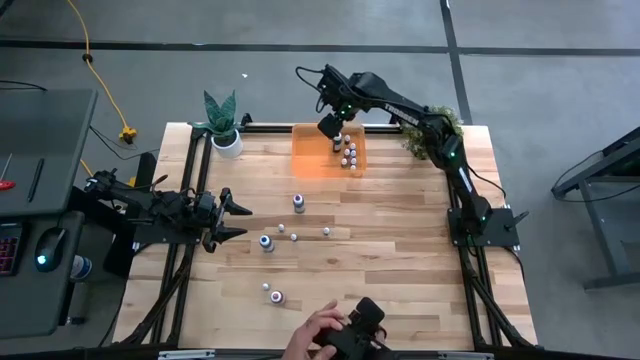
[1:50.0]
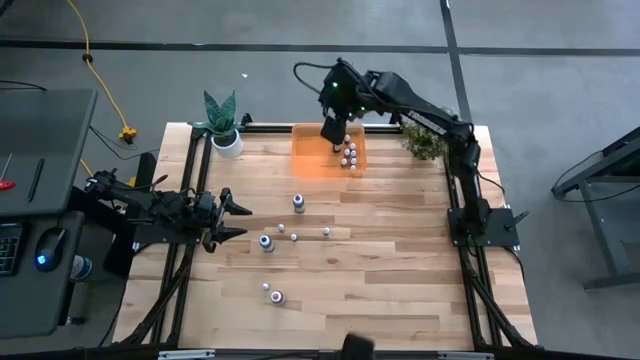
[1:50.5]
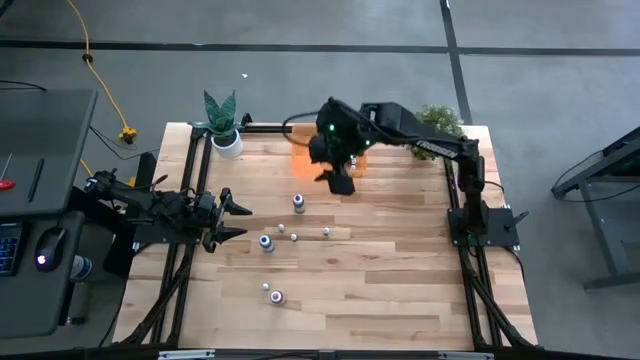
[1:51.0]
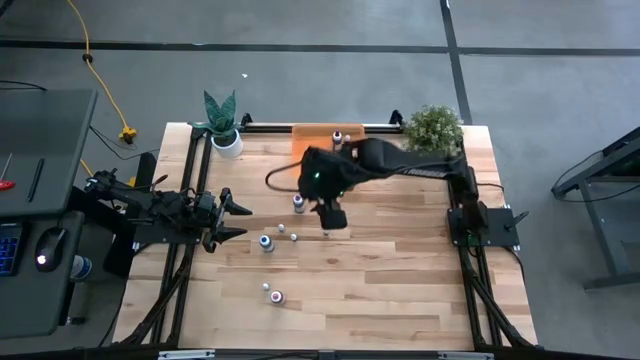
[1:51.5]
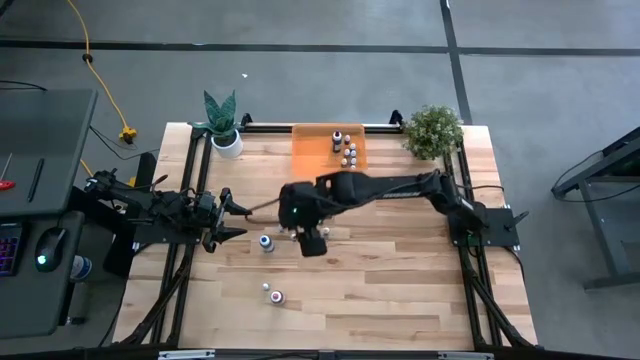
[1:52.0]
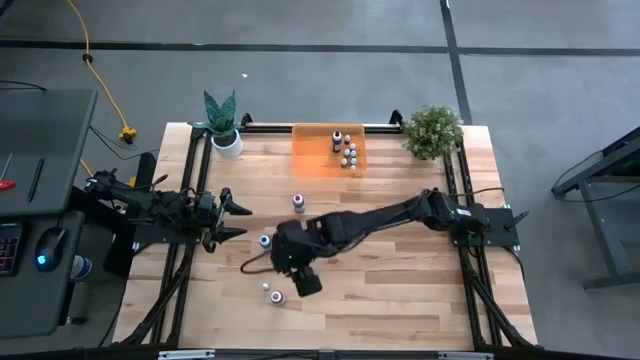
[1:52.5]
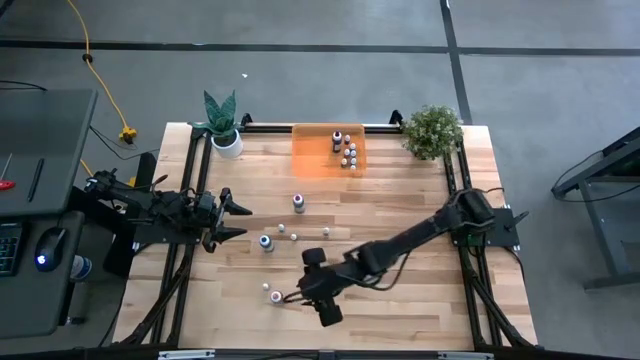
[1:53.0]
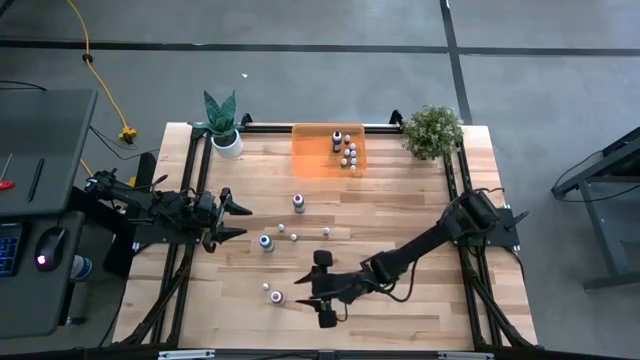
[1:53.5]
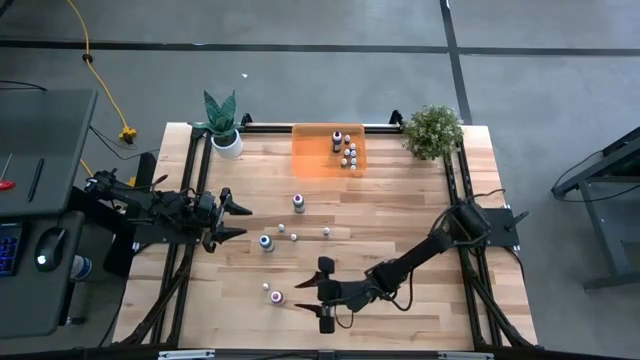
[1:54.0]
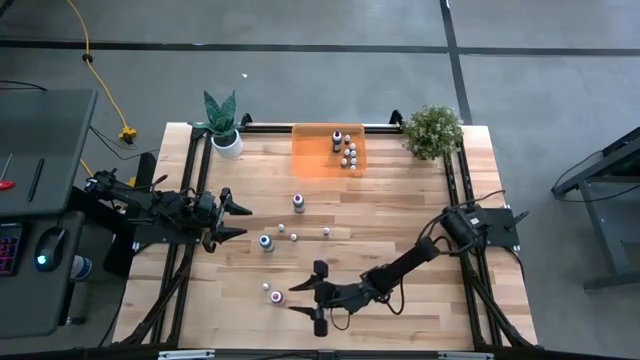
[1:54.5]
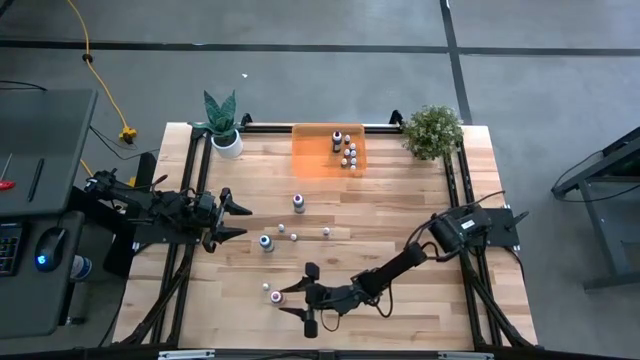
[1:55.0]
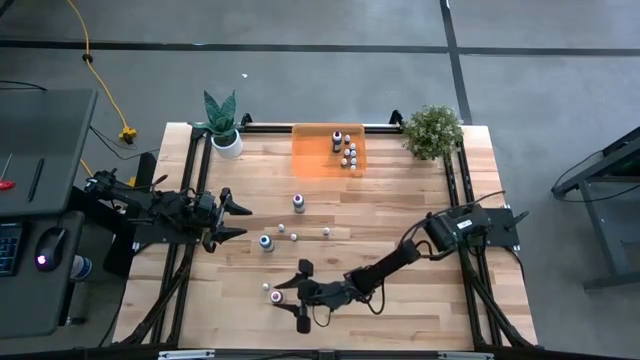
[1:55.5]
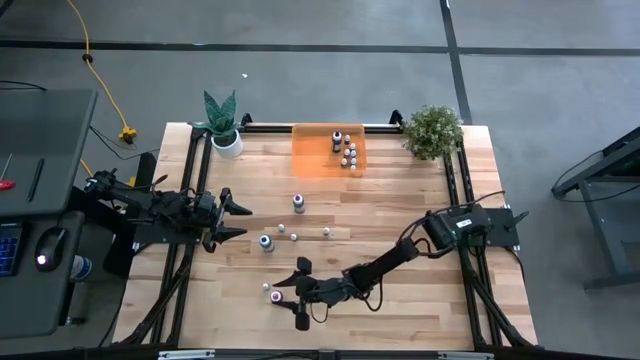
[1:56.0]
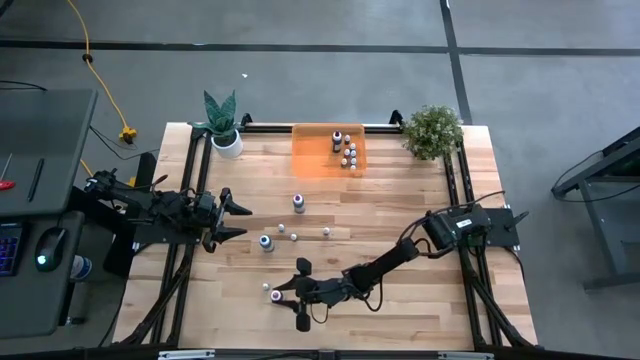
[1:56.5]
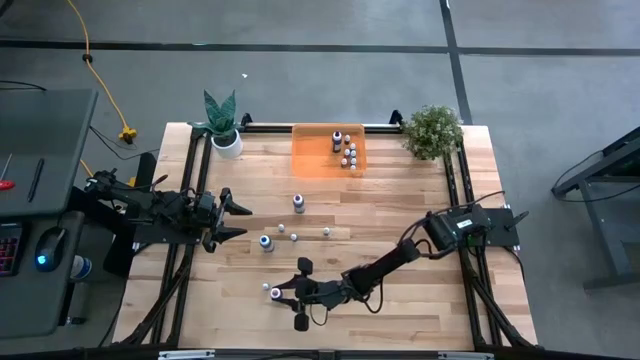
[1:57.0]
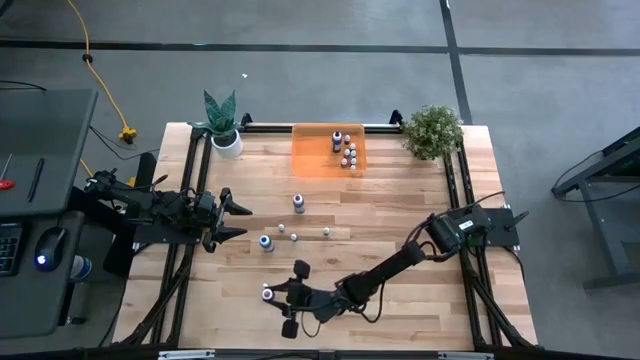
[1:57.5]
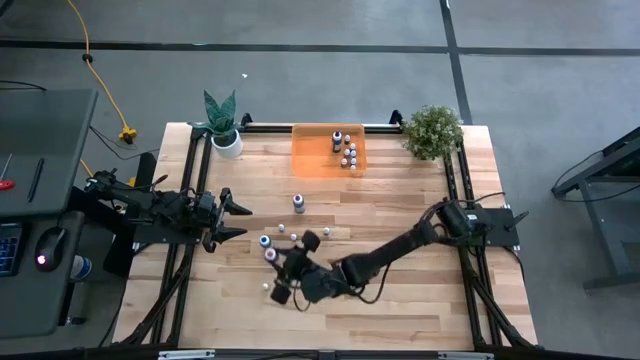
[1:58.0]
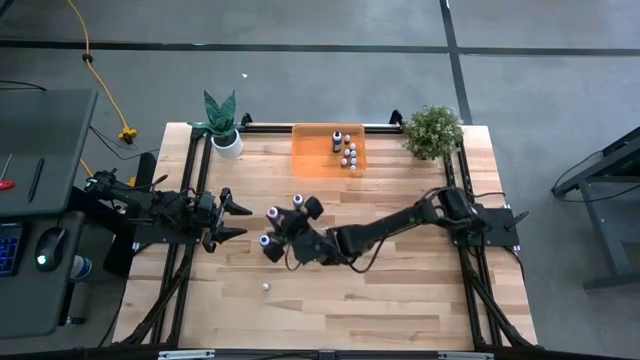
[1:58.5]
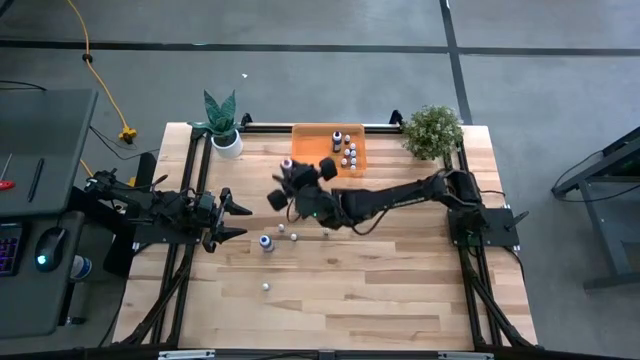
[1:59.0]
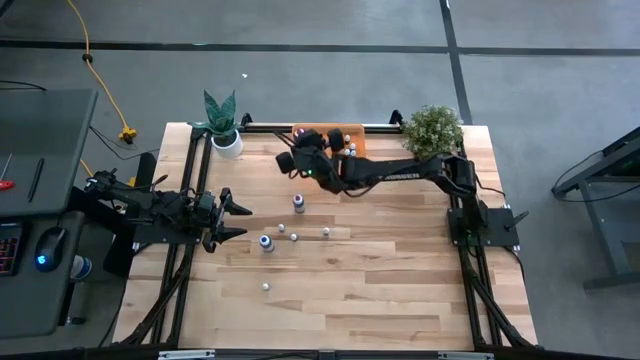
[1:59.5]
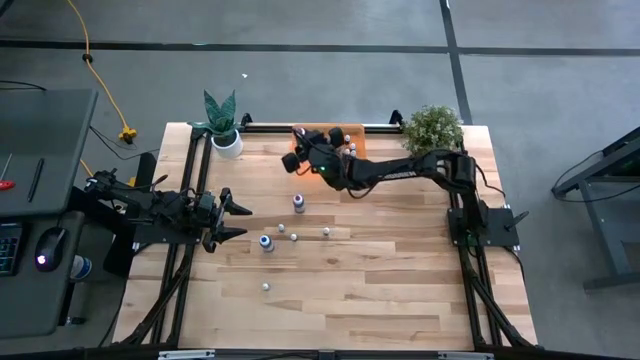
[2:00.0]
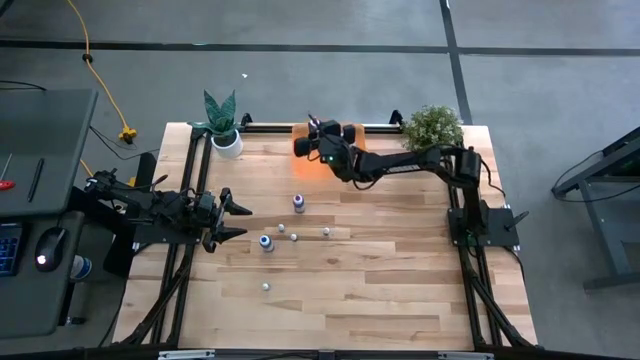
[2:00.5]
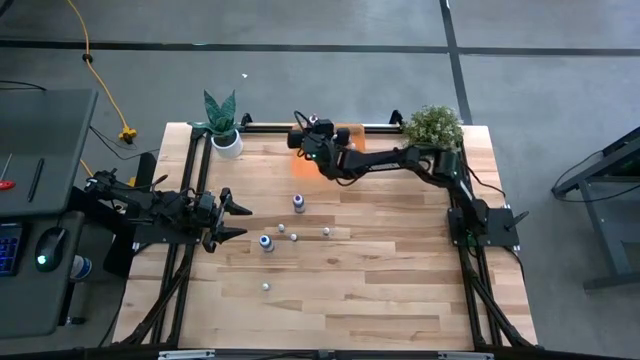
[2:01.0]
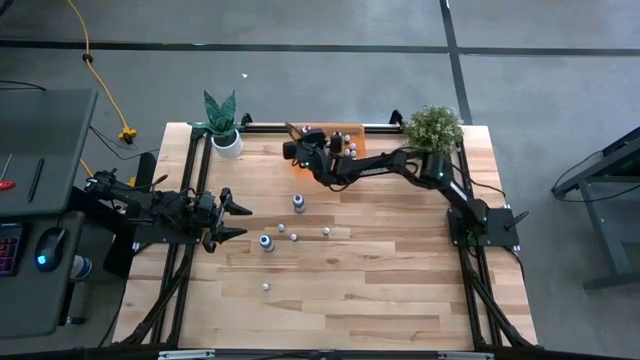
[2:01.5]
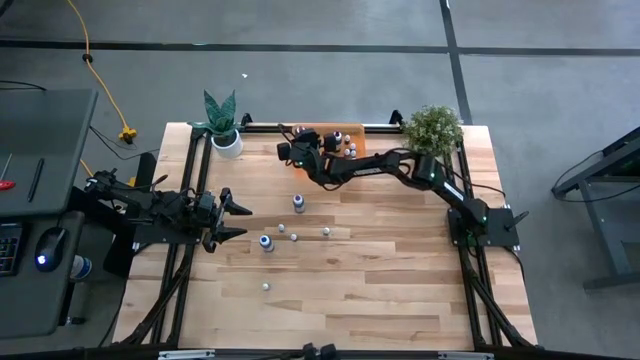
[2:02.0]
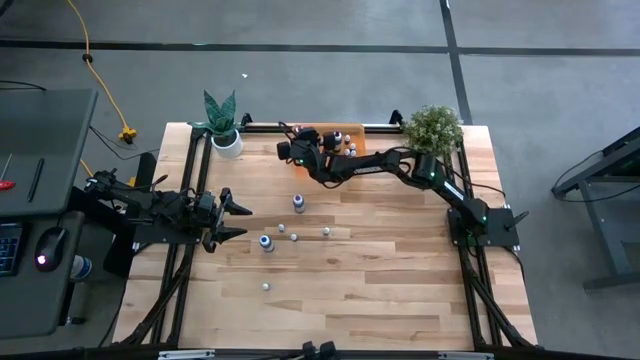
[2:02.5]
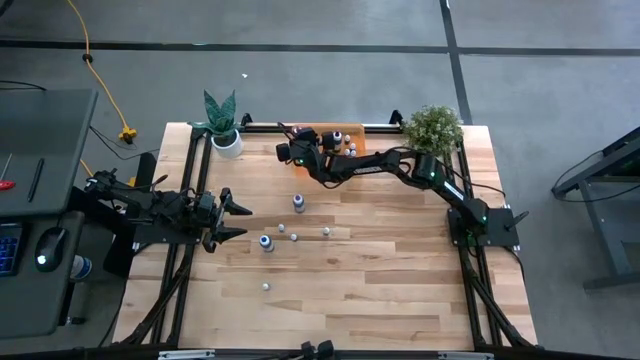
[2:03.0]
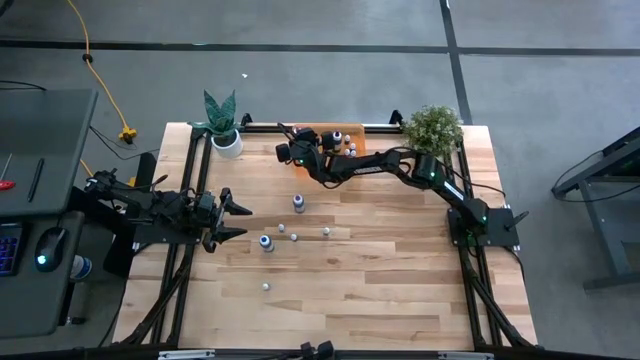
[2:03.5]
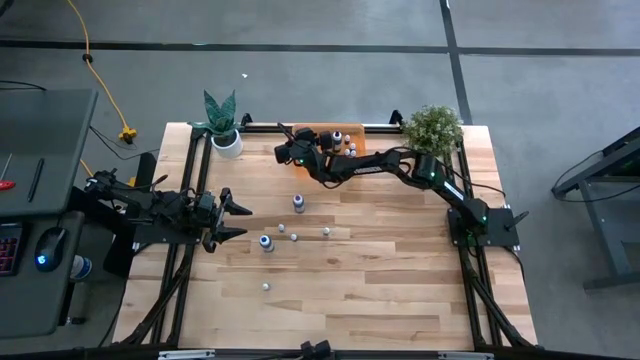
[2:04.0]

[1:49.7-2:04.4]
Task: Pick & Place food coloring
Put the big pink food coloring bottle into the orange bin

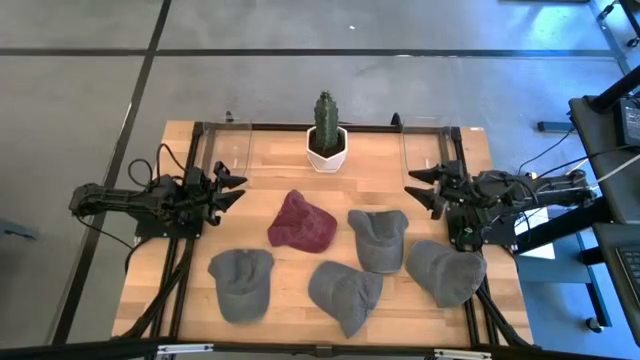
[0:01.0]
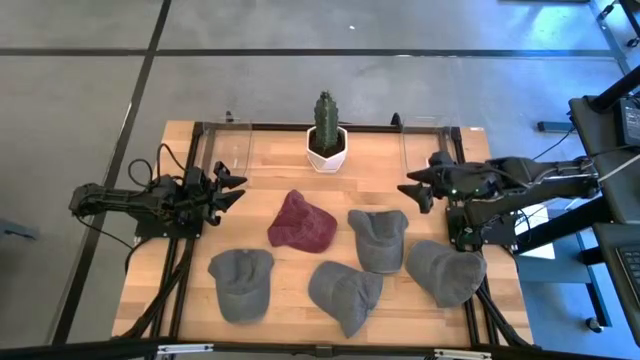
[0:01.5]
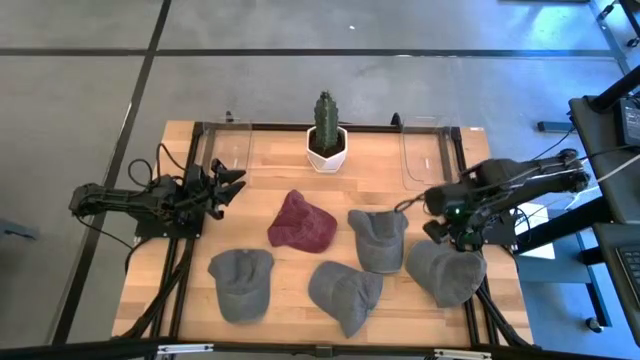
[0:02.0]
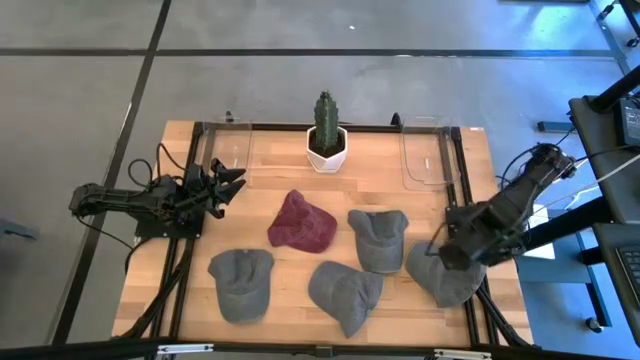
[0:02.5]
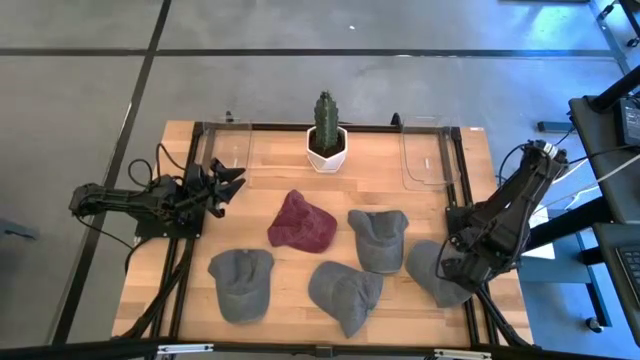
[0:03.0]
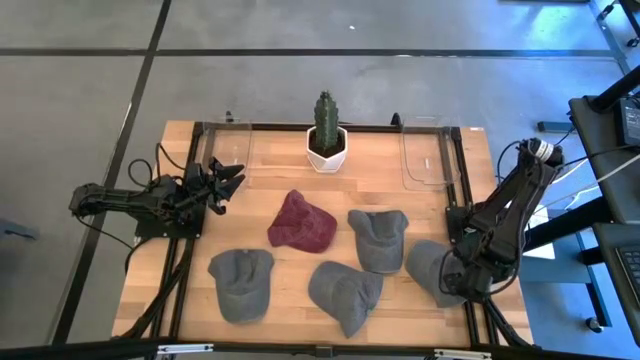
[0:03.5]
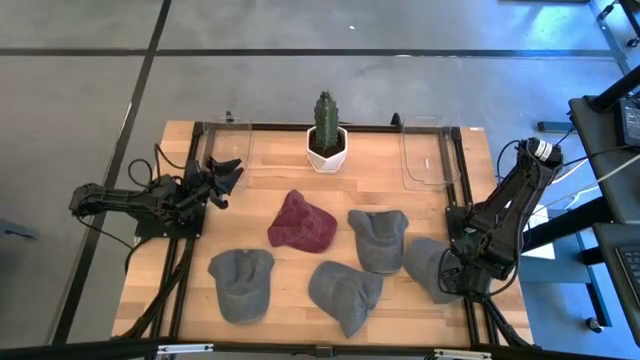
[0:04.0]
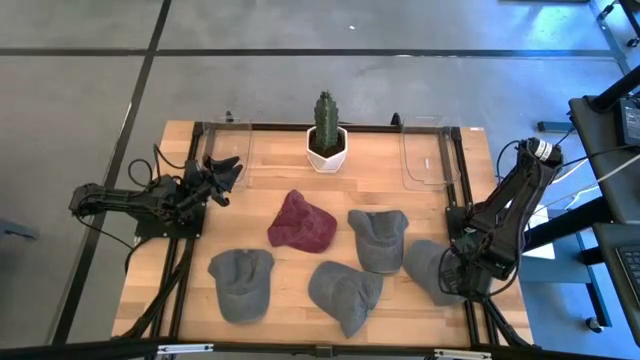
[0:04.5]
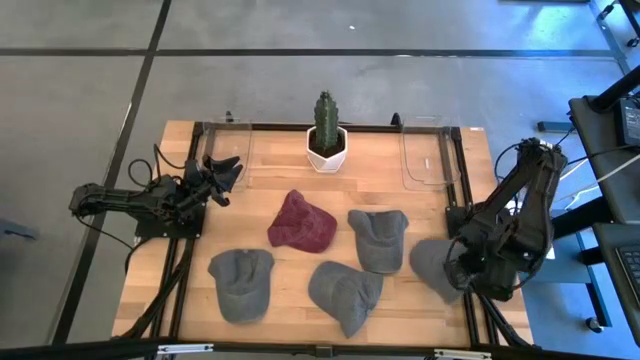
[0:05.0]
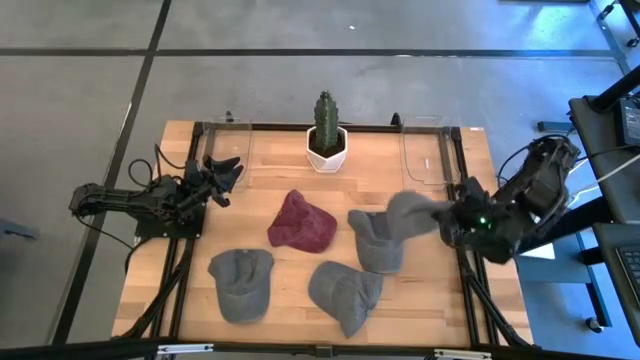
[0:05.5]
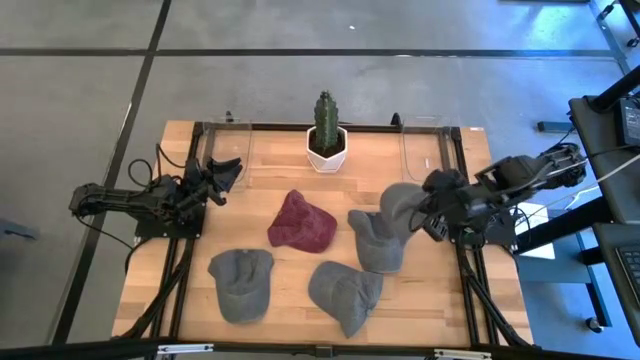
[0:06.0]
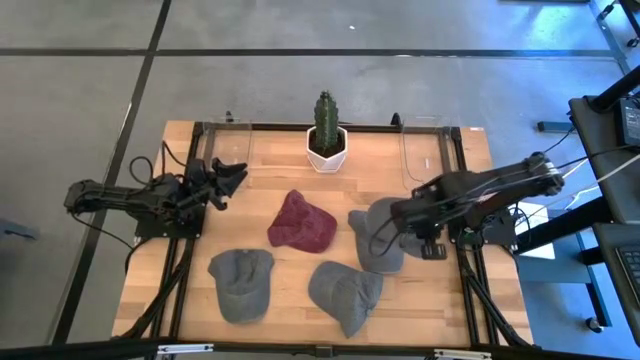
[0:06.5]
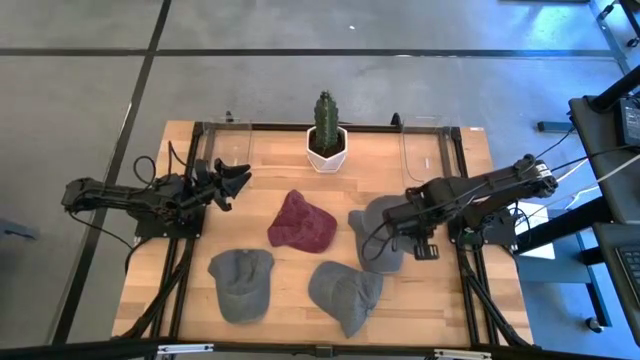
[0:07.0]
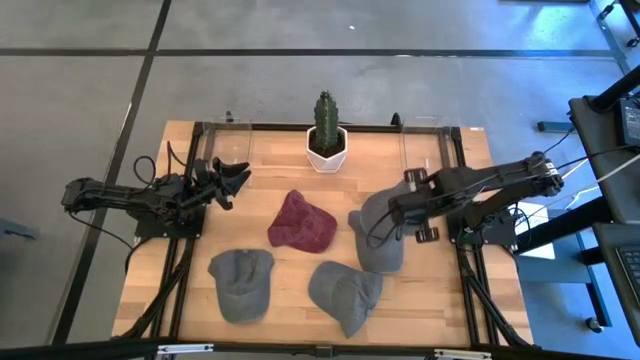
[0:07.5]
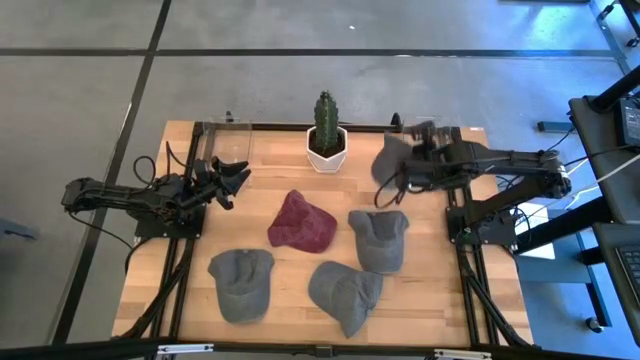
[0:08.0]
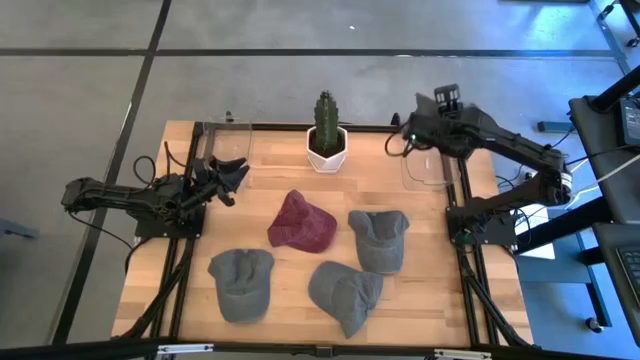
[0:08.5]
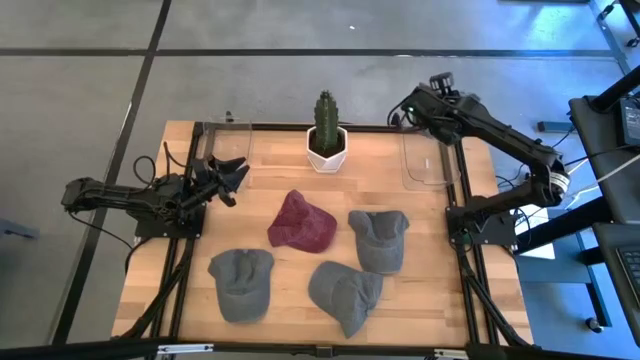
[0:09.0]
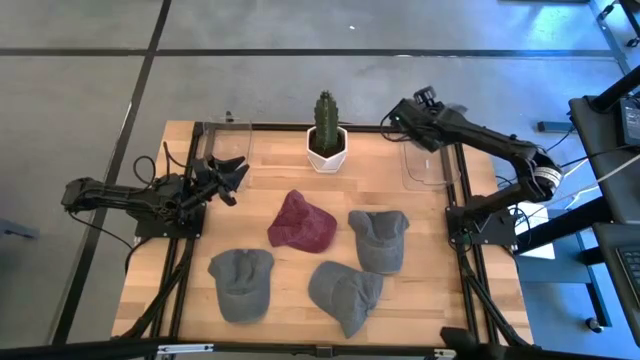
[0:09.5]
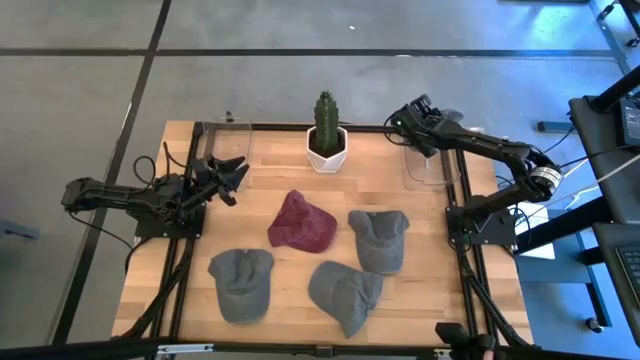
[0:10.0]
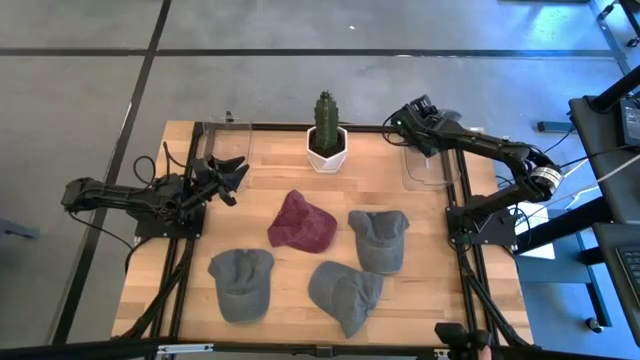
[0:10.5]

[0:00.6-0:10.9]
Task: Pick & Place hat
Put the gray cap into the right transparent bin
